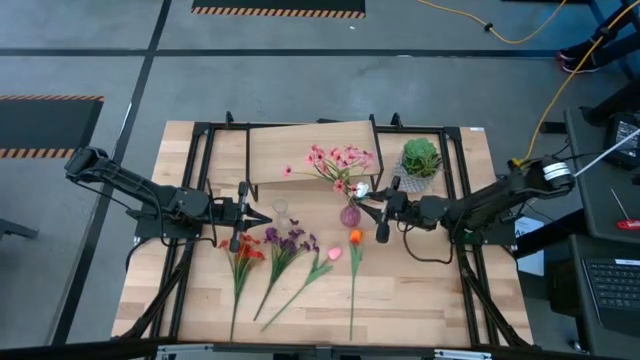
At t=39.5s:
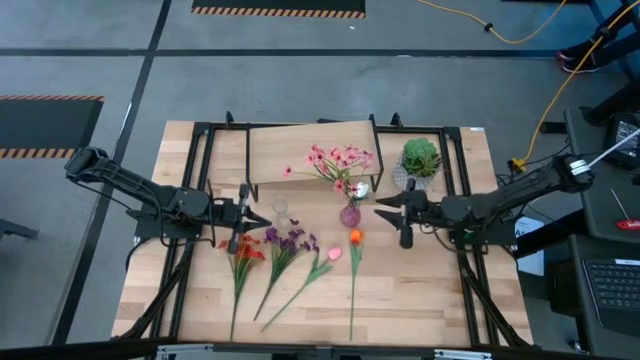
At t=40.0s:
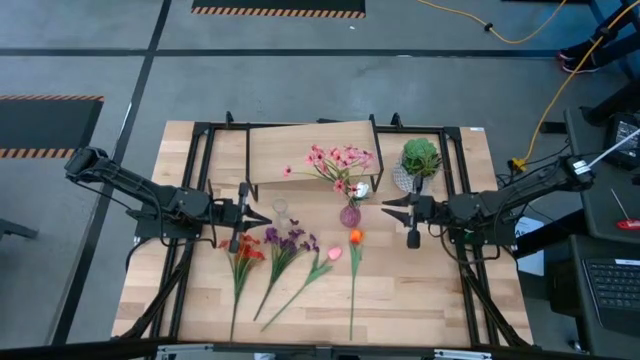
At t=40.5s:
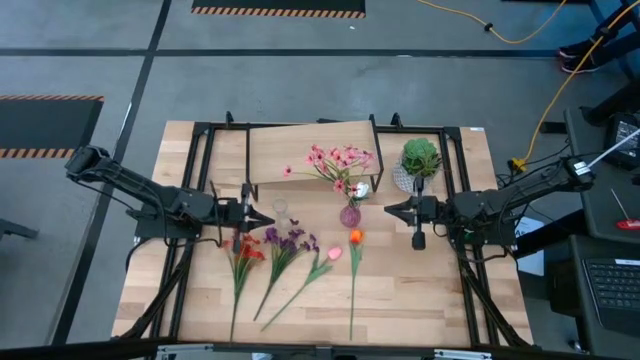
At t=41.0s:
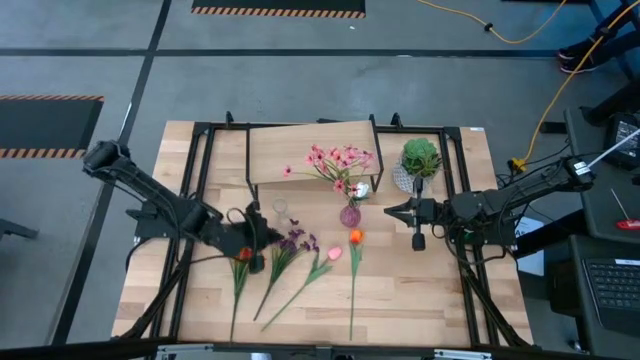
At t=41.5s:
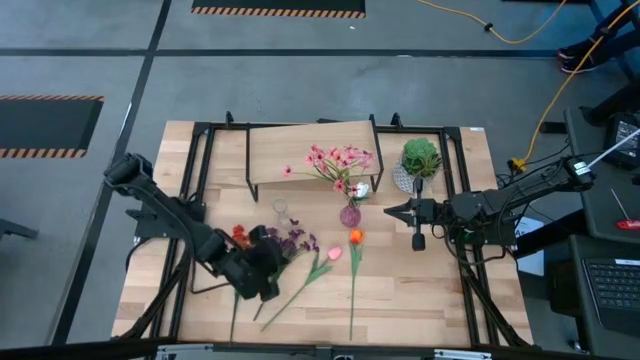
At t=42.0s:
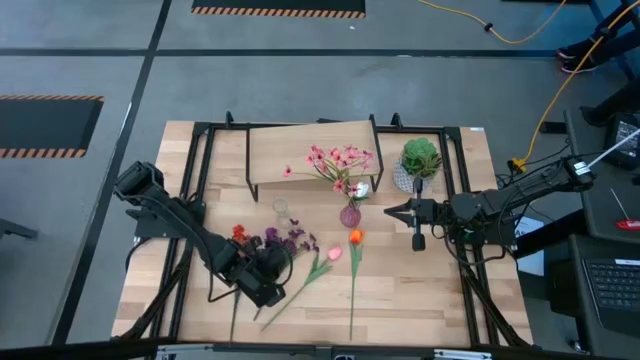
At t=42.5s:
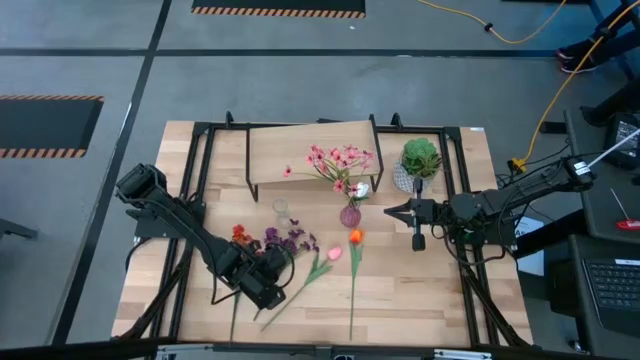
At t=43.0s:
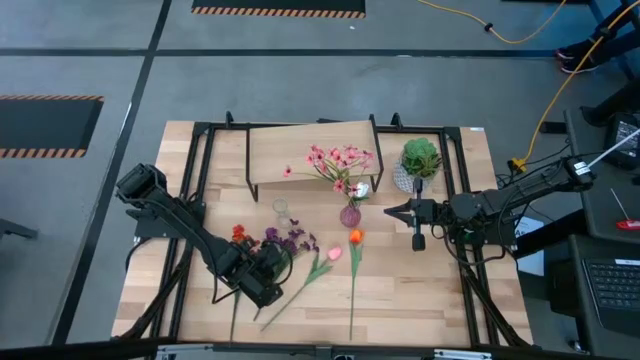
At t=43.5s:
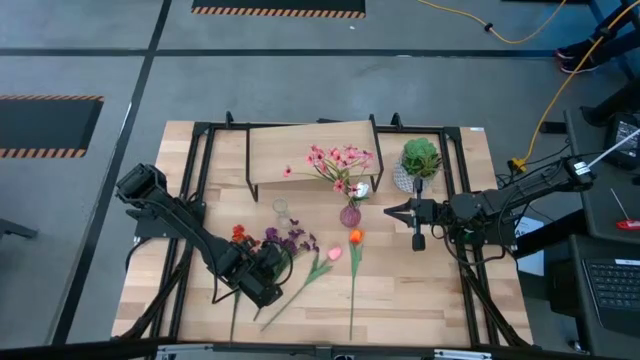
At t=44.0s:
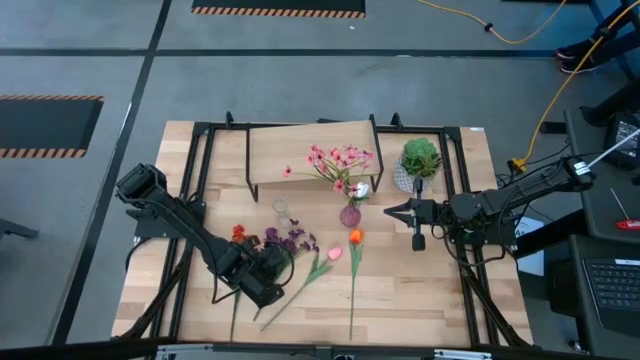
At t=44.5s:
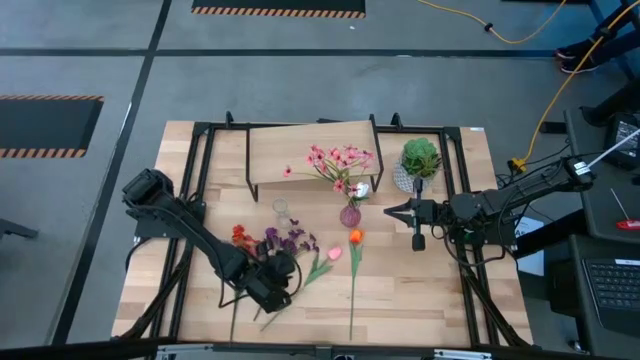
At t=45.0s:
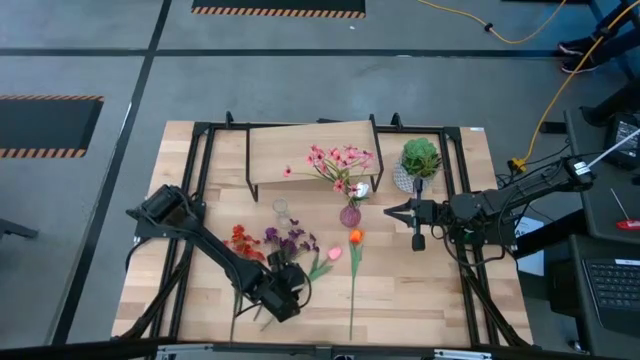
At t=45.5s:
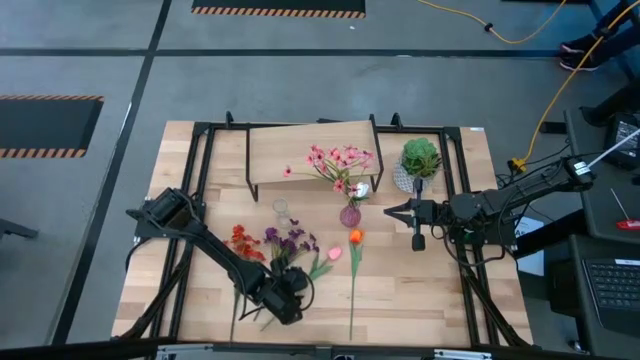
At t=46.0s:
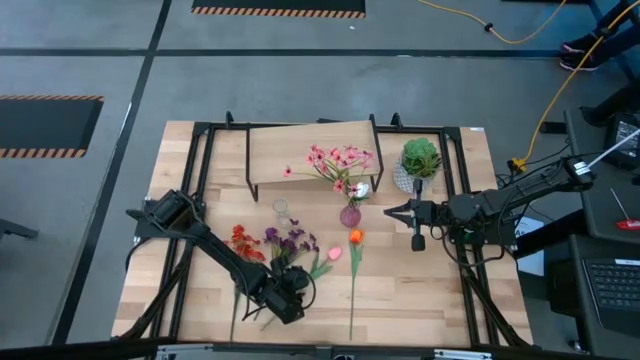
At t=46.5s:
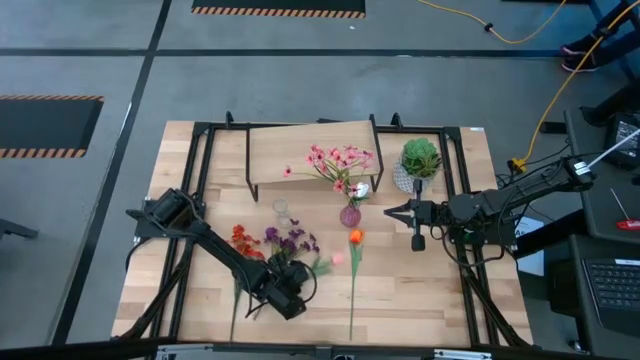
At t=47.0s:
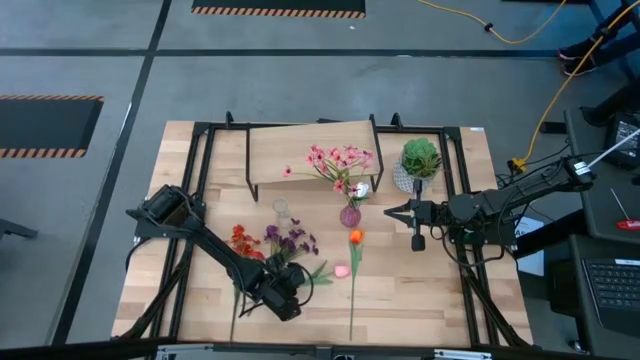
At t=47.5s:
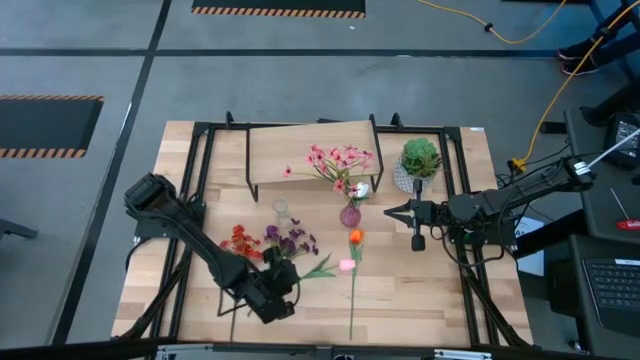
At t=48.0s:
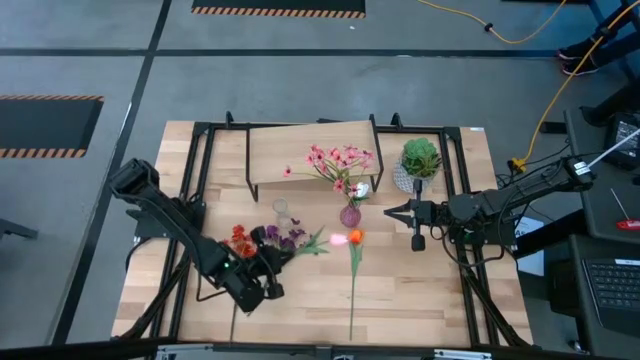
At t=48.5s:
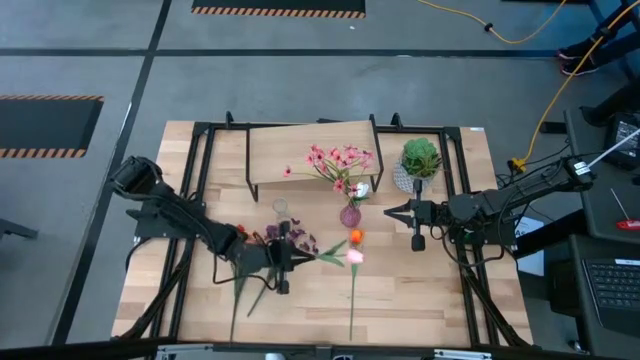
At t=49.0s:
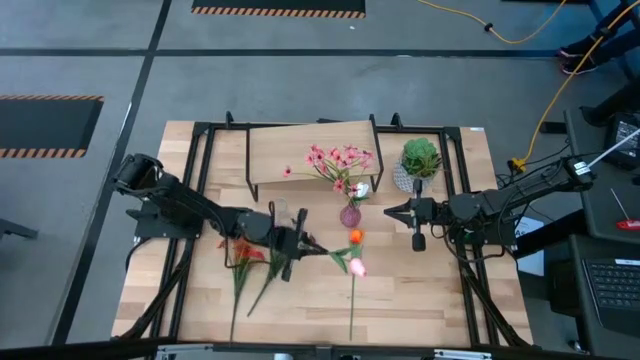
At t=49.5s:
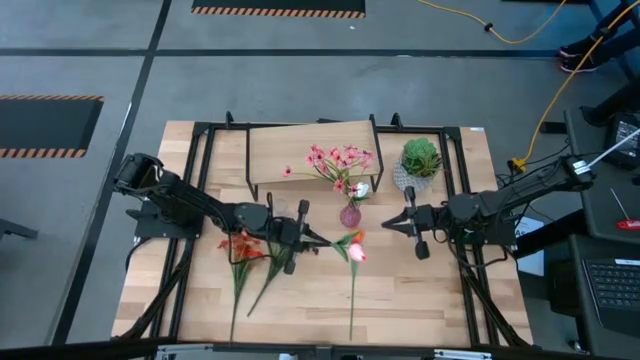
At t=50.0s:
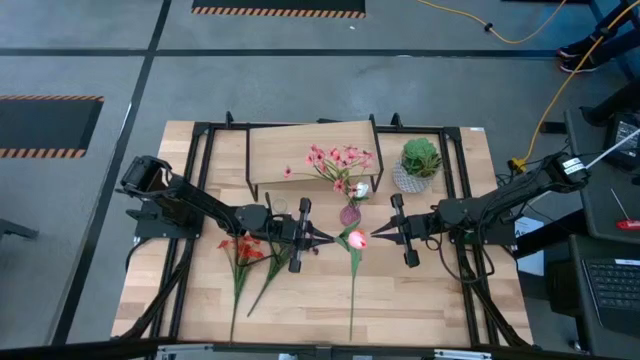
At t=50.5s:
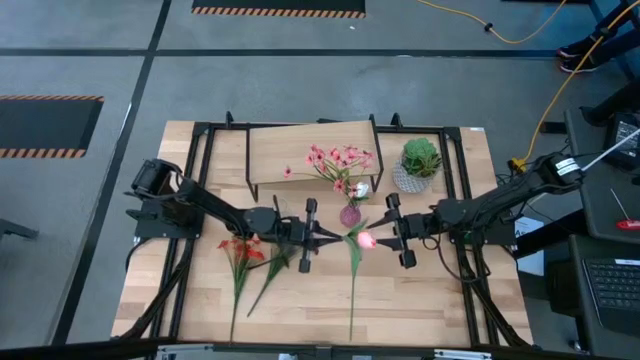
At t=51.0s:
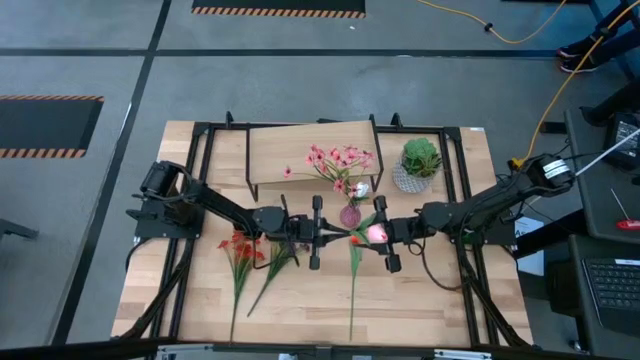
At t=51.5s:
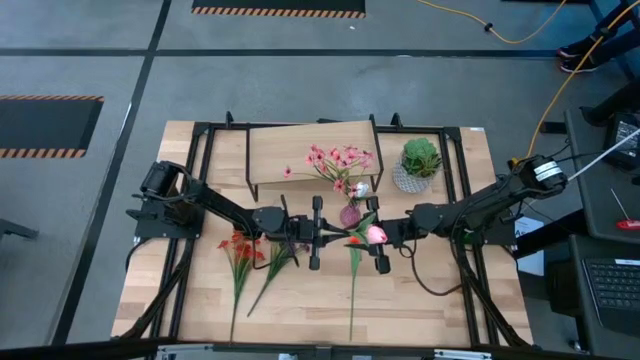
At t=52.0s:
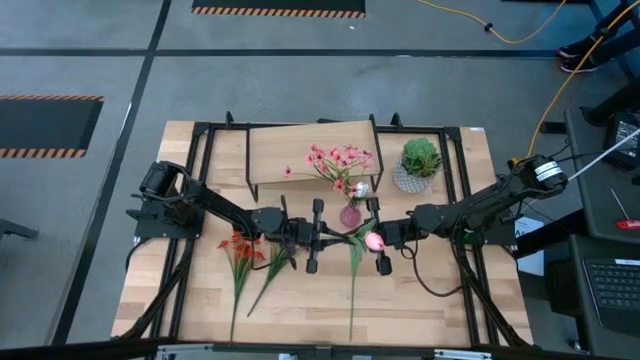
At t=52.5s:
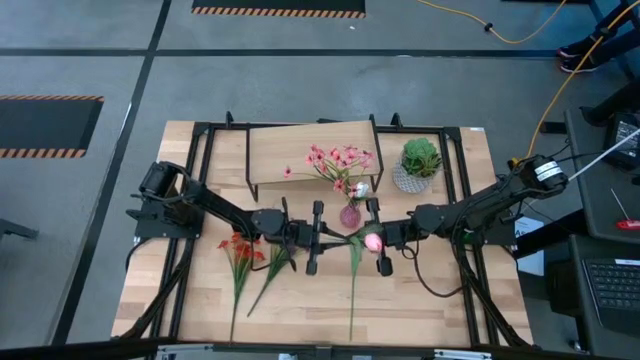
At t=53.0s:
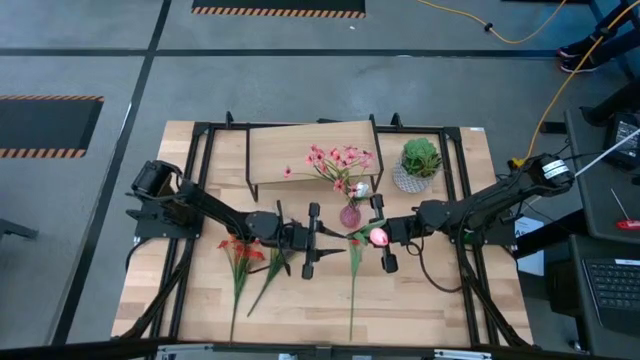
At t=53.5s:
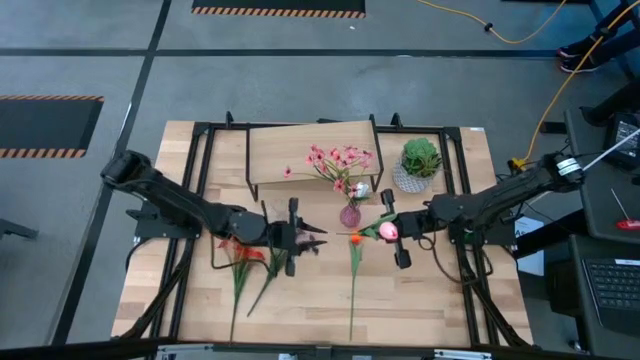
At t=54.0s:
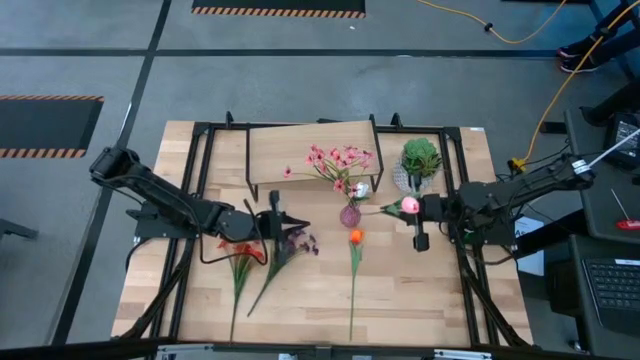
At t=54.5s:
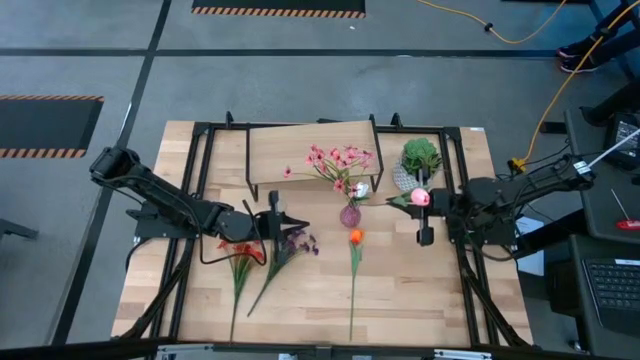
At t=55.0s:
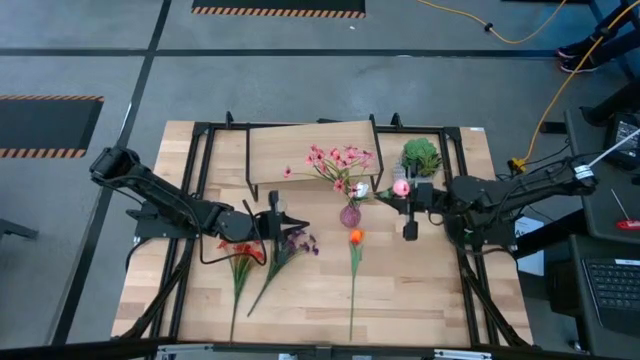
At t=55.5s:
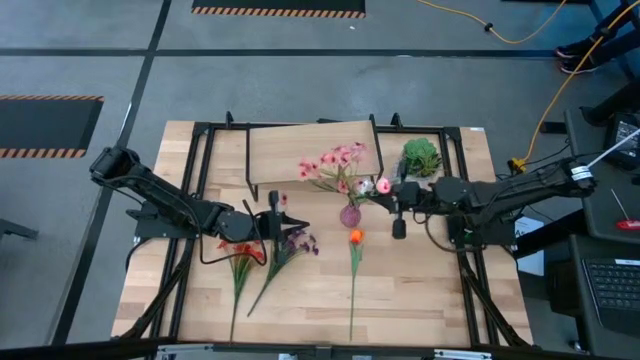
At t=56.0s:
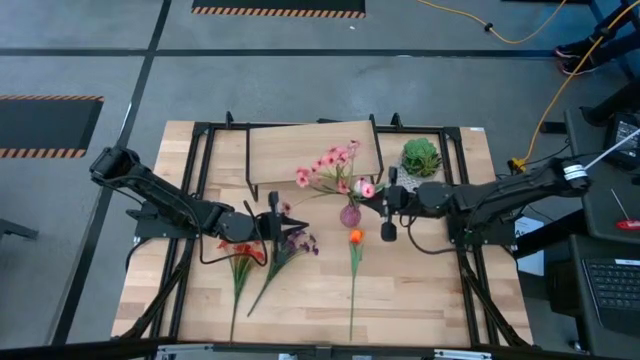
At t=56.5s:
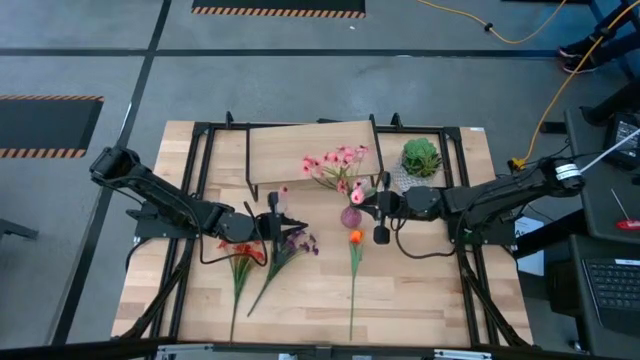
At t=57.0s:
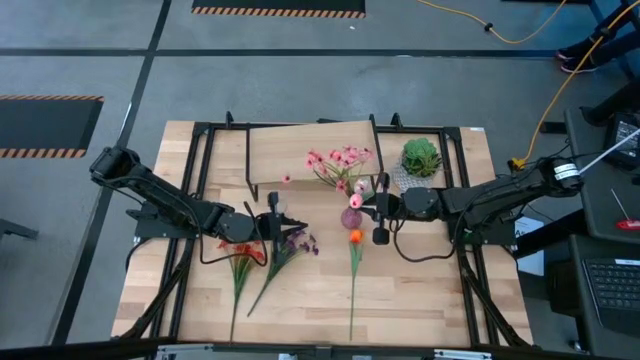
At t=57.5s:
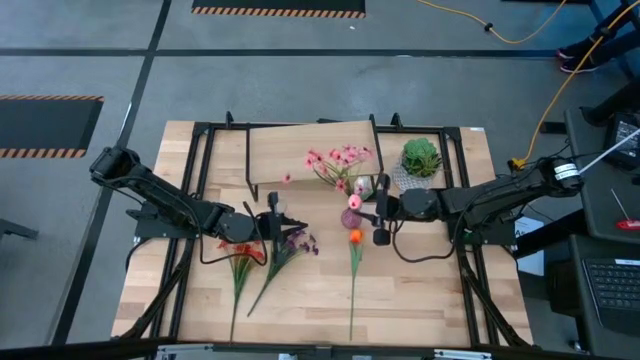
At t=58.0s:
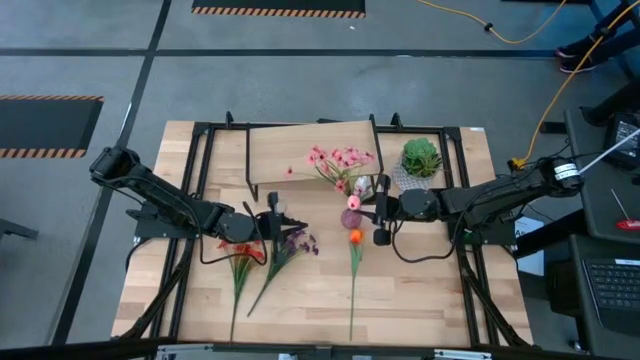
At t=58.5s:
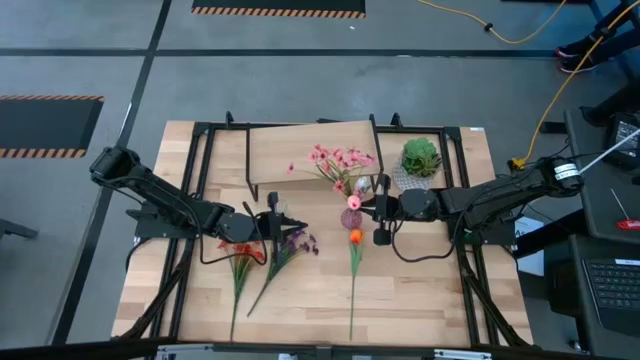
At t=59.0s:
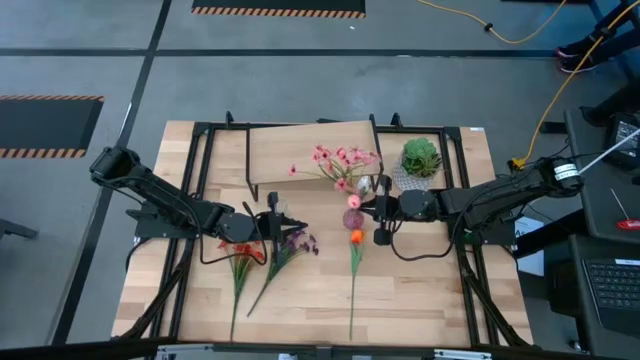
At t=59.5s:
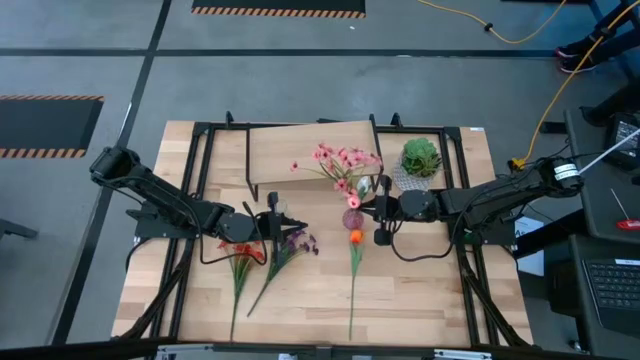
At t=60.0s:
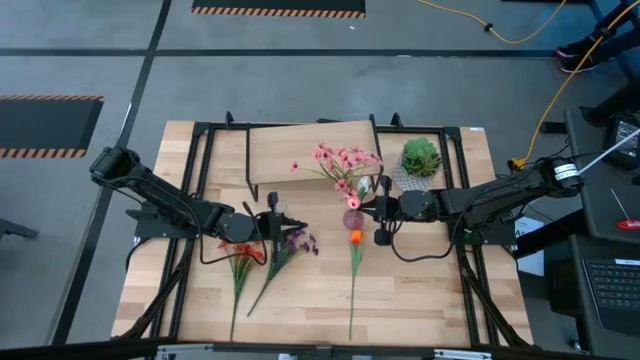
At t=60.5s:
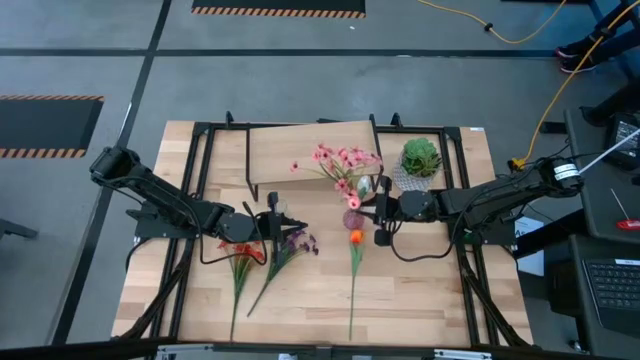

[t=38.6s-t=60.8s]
Task: Pick and place flowers into a vace then onto a shelf
Put the pink flower into the pink vase
